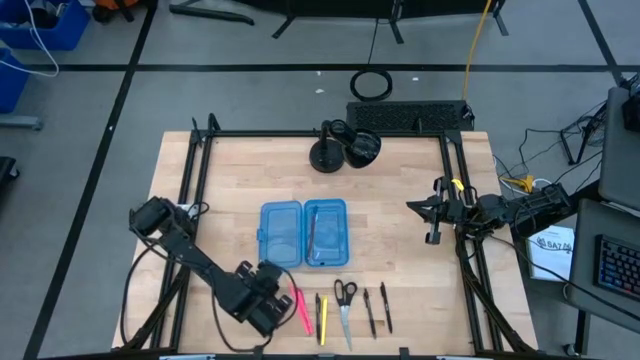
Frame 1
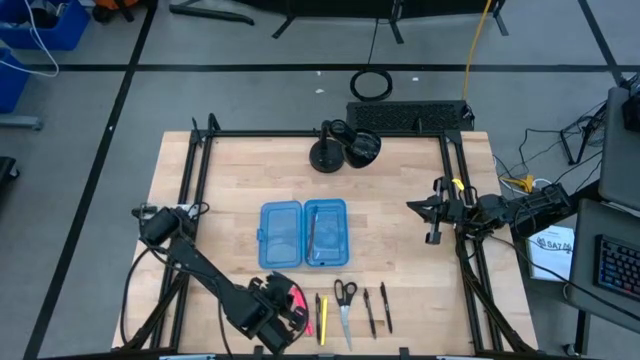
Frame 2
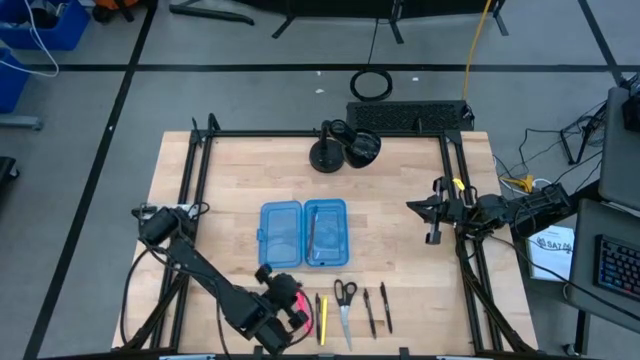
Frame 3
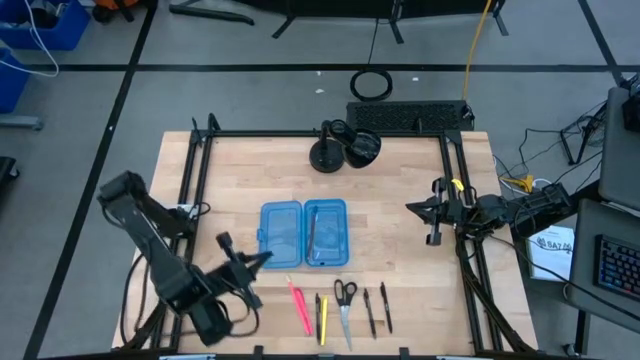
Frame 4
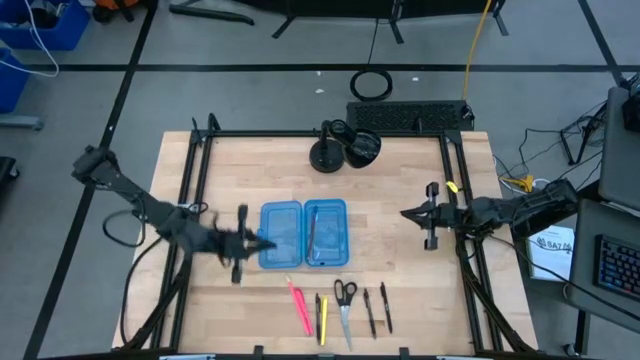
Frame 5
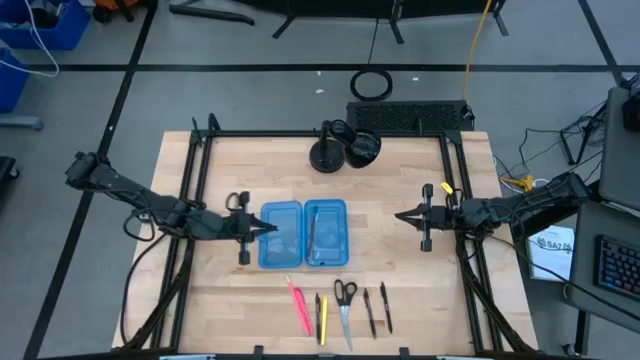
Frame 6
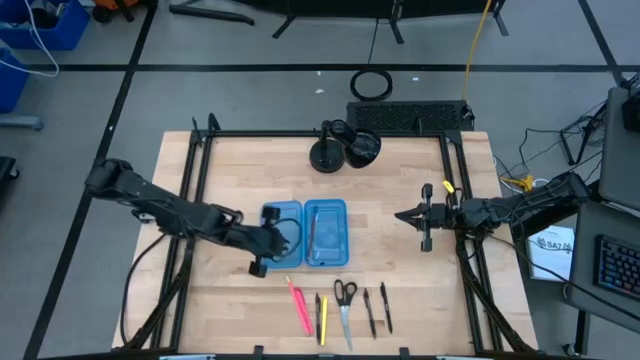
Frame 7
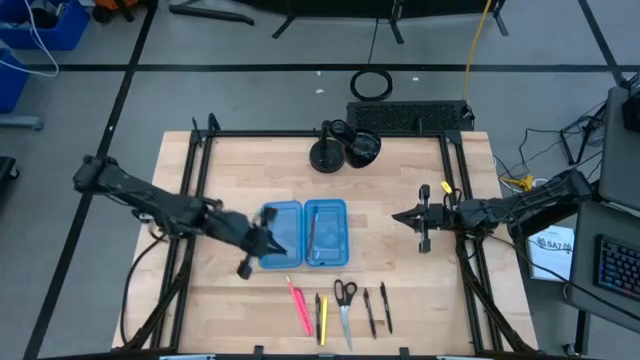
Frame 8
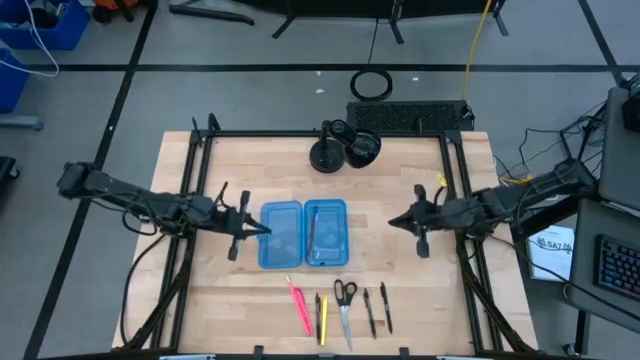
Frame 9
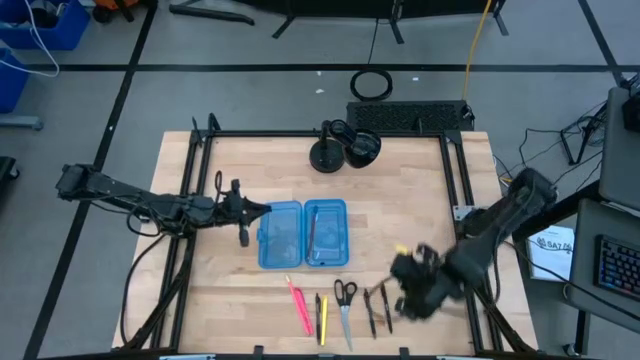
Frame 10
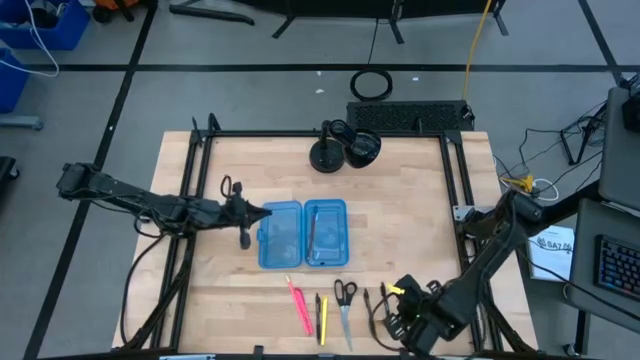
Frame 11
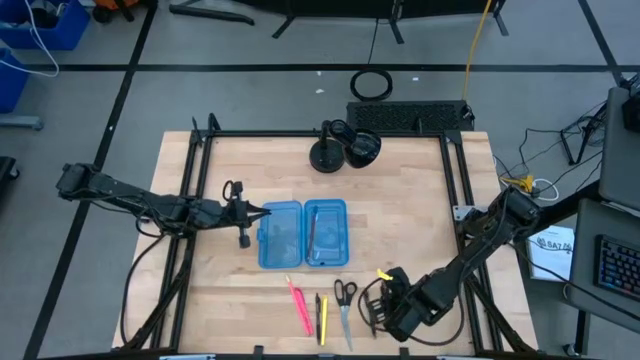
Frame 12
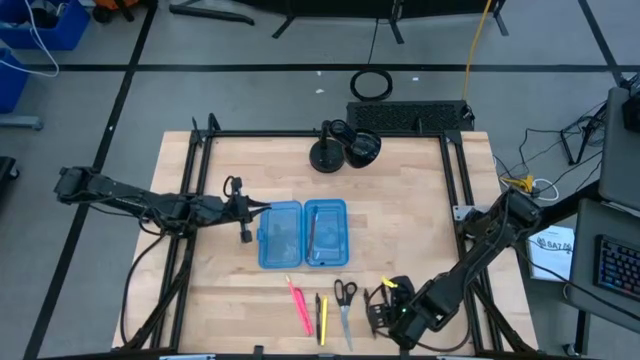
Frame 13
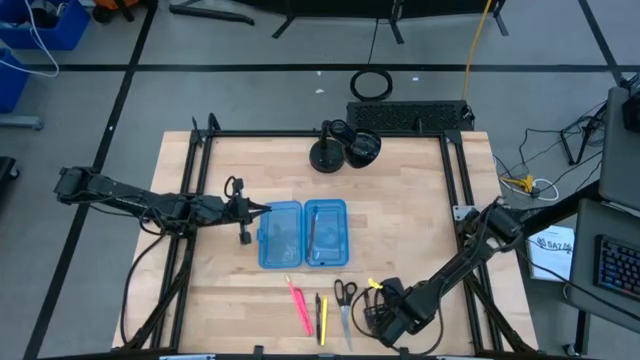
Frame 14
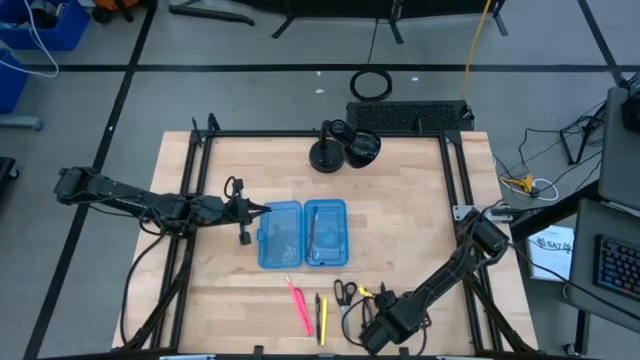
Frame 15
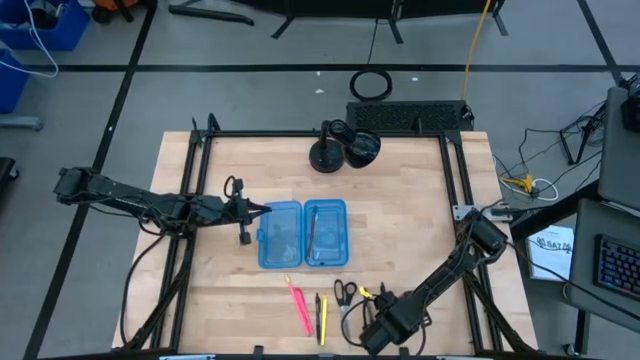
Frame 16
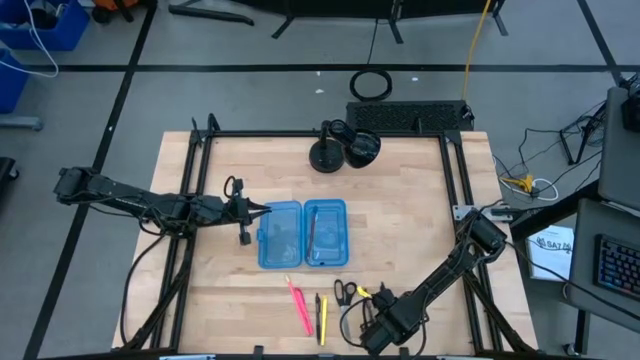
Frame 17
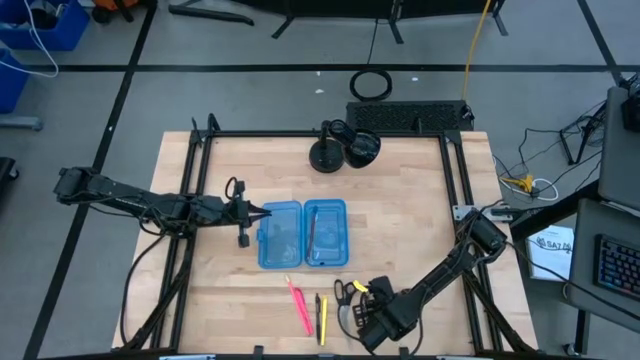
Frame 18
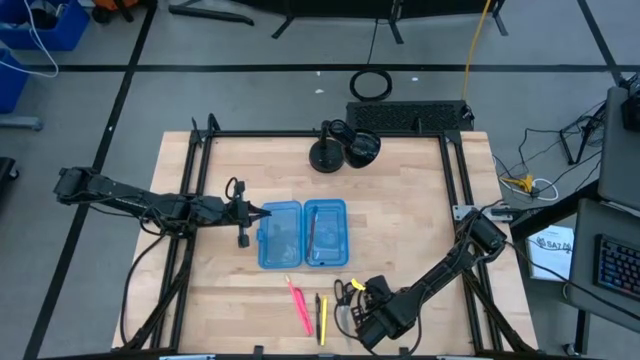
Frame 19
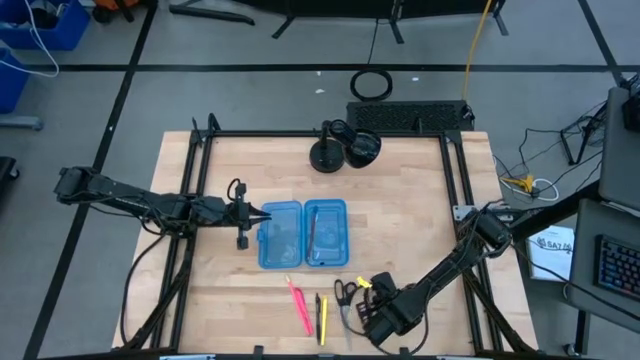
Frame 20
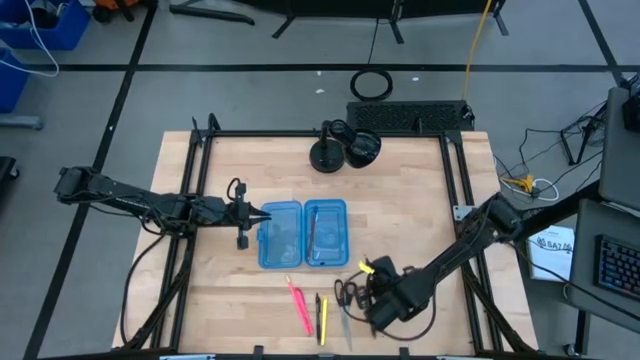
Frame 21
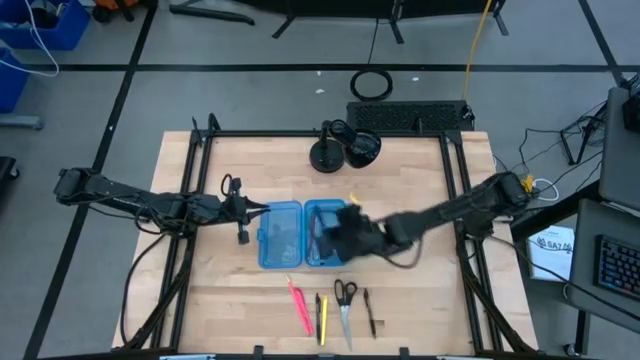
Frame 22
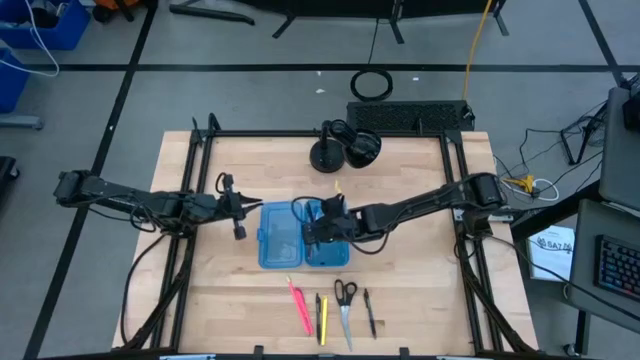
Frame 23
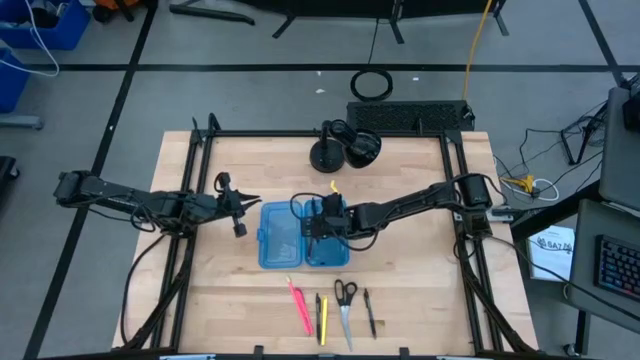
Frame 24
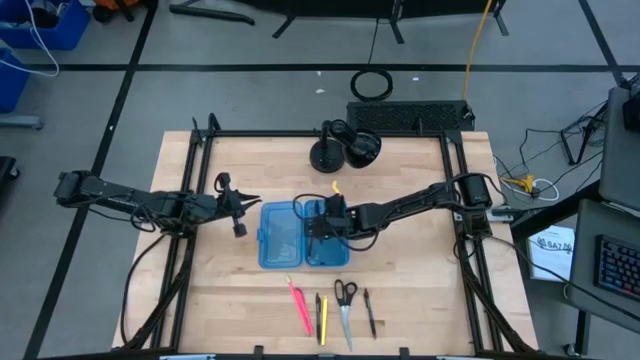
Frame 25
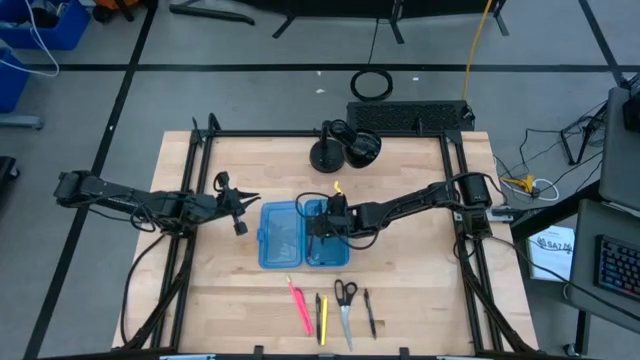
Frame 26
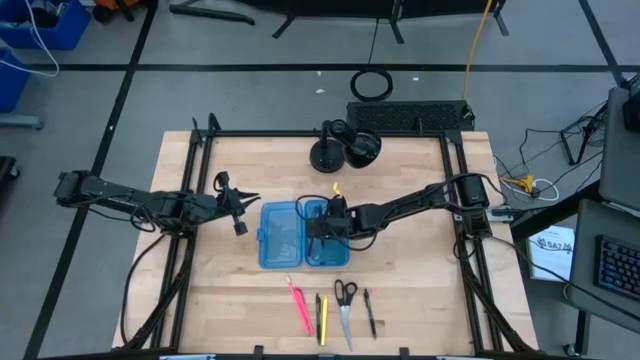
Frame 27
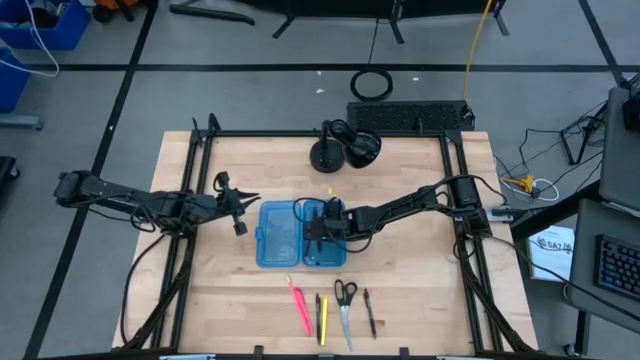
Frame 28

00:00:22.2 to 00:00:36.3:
Task: Pick & place school supplies into a supply box
Put the right black pen into the blue supply box

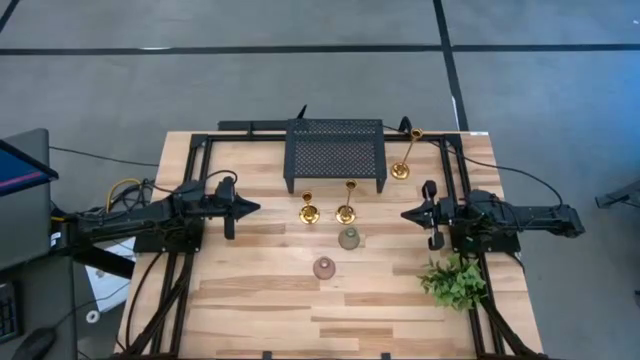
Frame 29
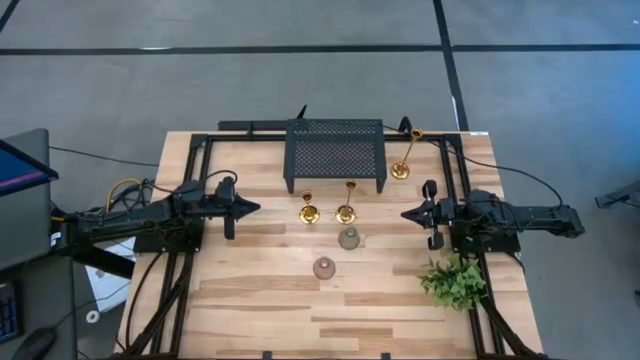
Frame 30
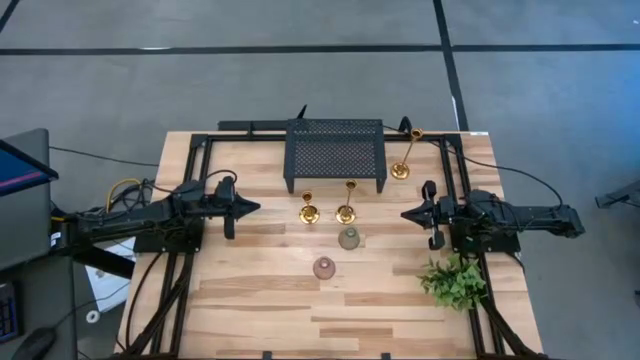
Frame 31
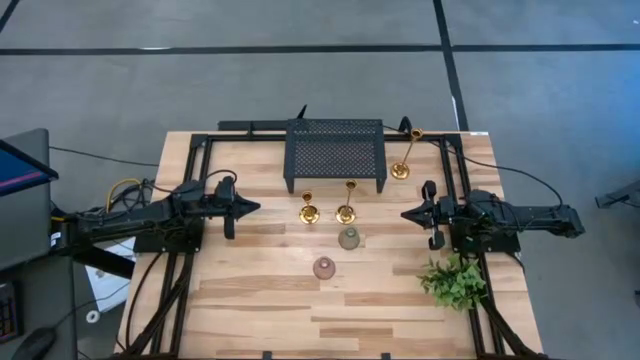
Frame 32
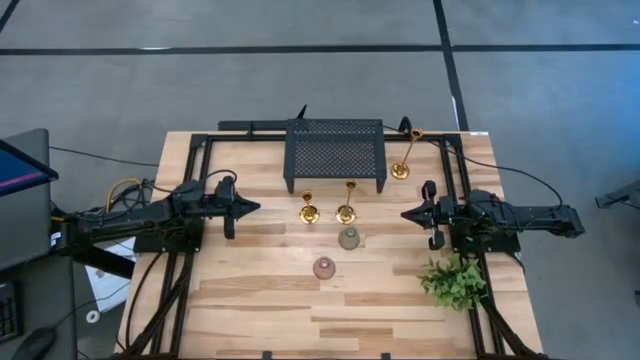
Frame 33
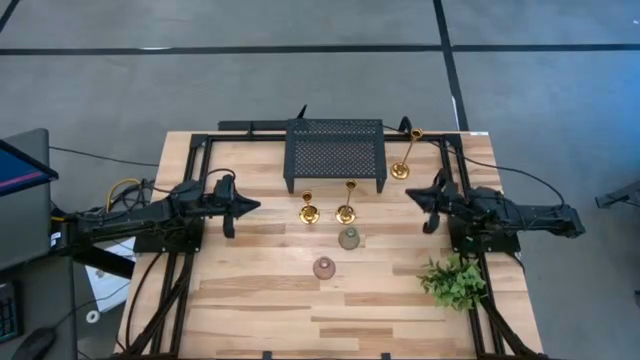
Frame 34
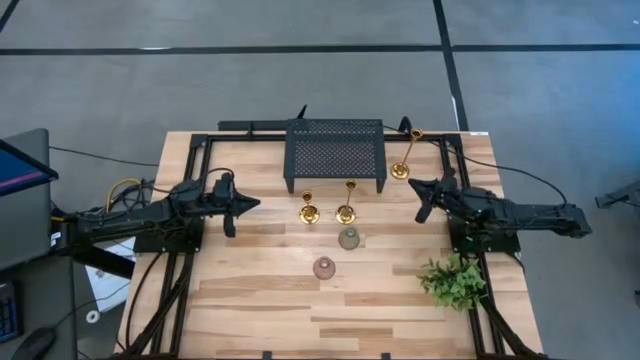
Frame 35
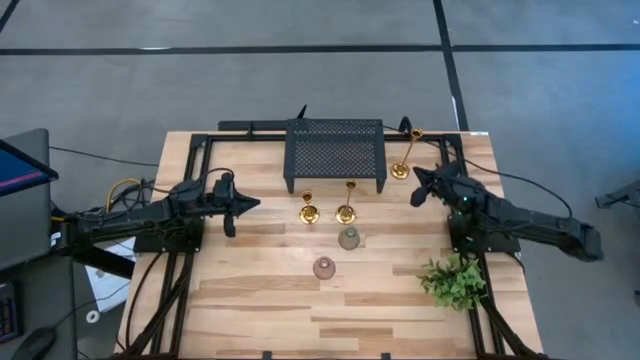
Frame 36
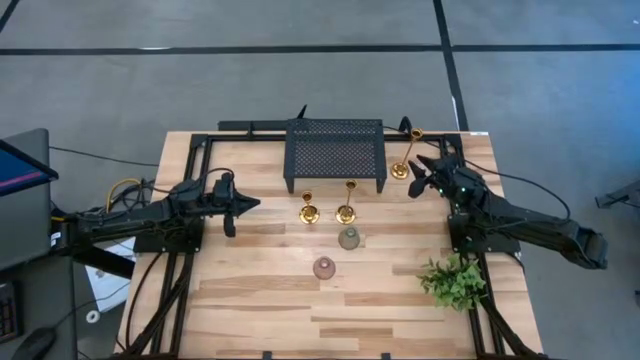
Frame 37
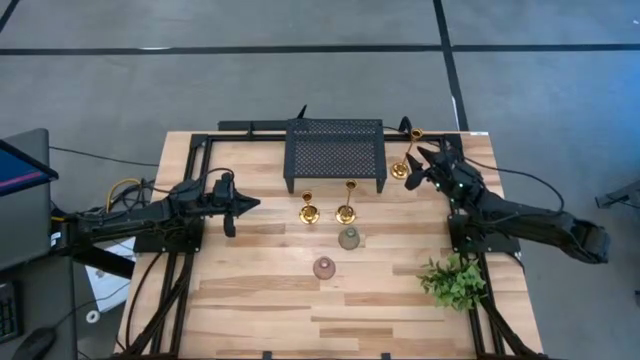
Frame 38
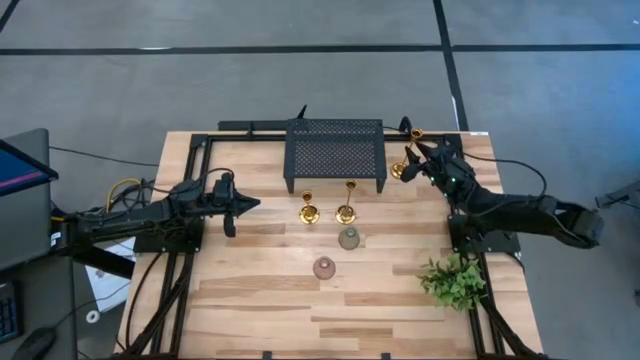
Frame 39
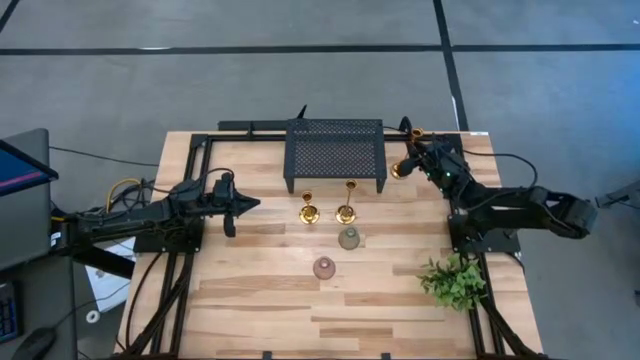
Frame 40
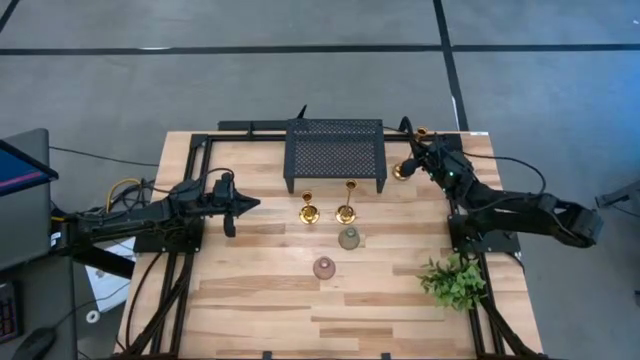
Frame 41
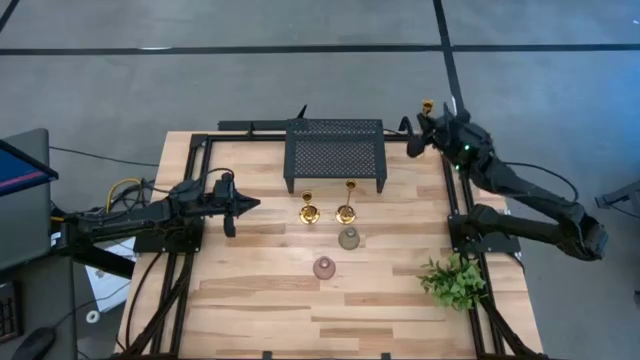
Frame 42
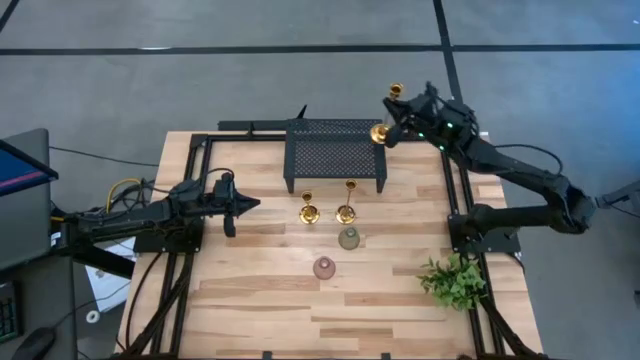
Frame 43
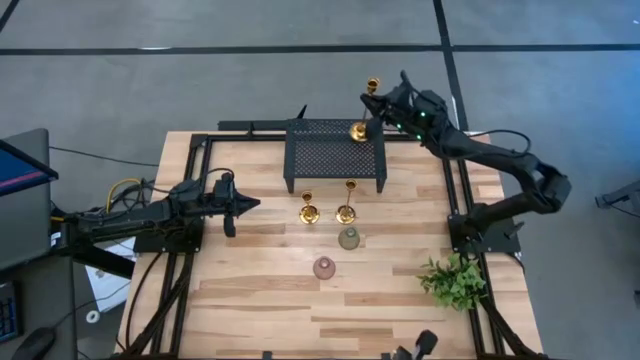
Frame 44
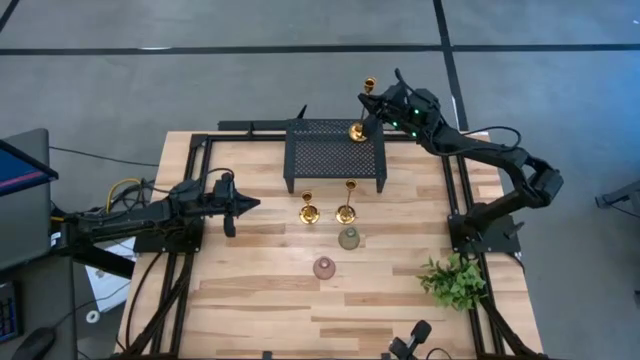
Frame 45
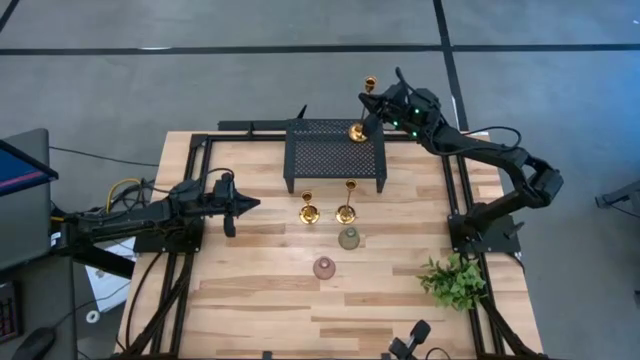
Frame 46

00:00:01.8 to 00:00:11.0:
Task: Pick & Place candle stick holders
Put the top gold candle holder on the shelf
